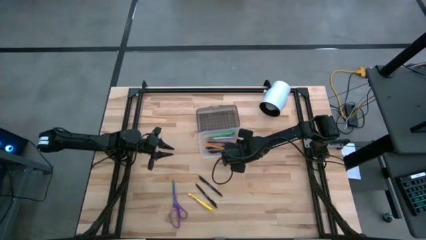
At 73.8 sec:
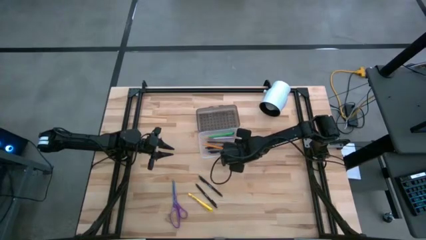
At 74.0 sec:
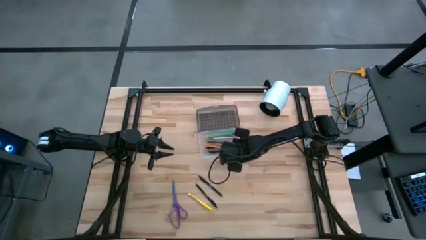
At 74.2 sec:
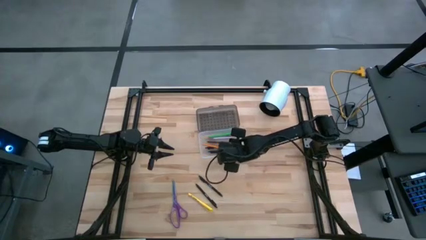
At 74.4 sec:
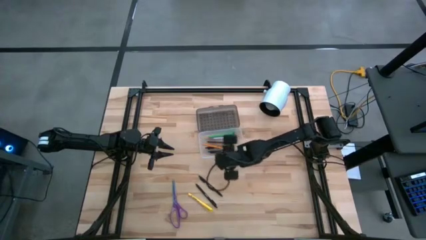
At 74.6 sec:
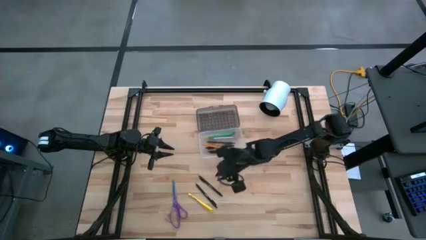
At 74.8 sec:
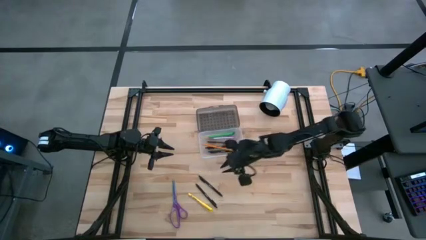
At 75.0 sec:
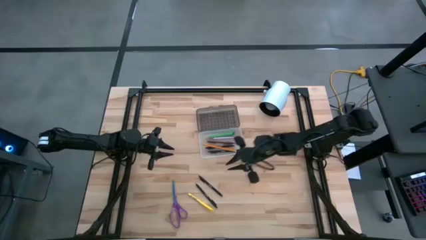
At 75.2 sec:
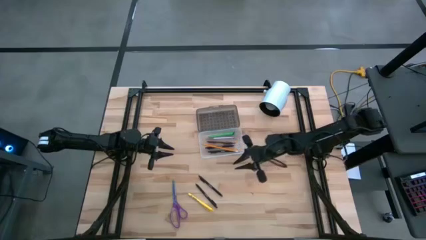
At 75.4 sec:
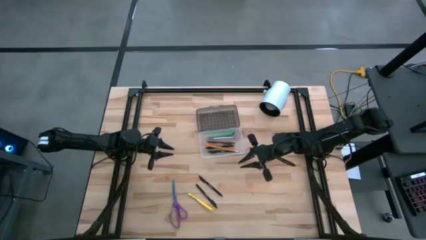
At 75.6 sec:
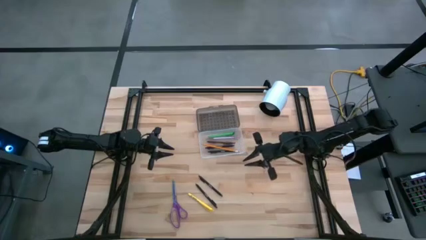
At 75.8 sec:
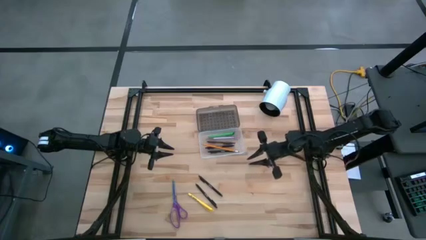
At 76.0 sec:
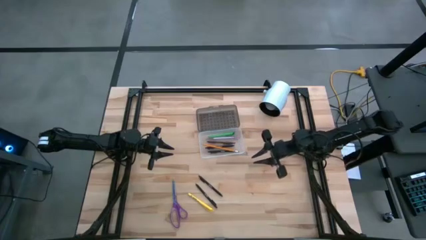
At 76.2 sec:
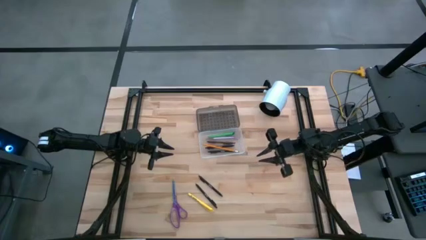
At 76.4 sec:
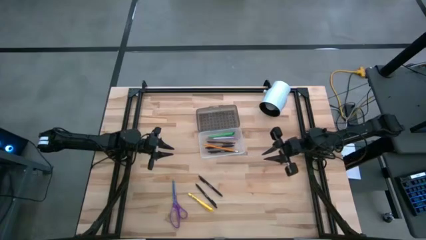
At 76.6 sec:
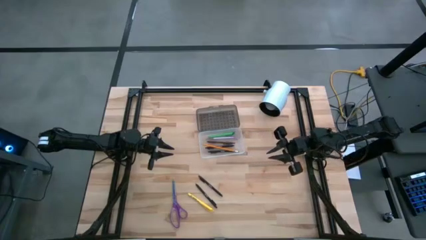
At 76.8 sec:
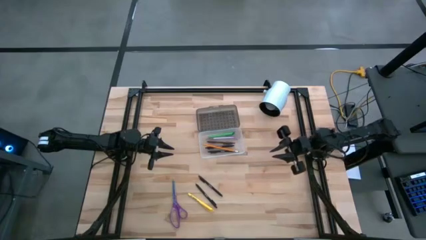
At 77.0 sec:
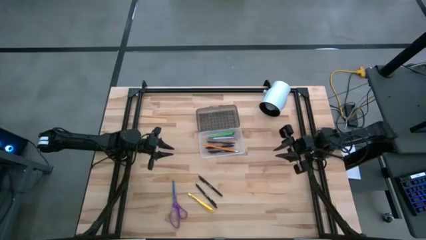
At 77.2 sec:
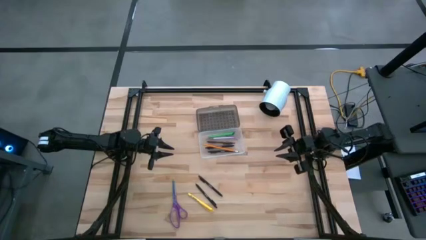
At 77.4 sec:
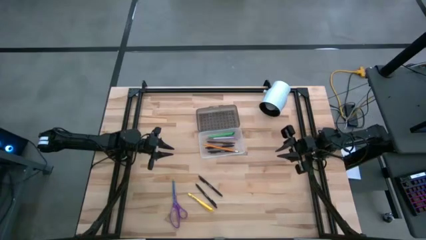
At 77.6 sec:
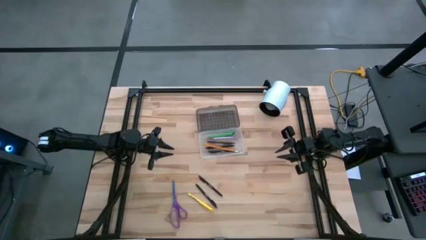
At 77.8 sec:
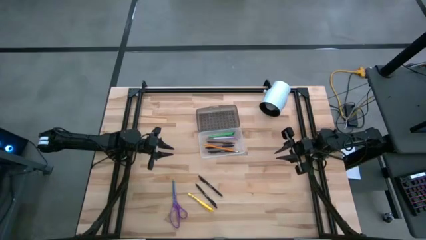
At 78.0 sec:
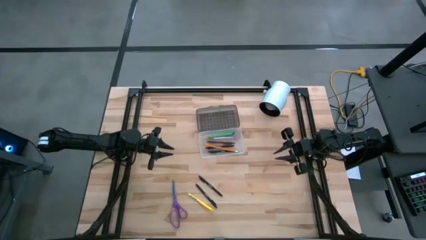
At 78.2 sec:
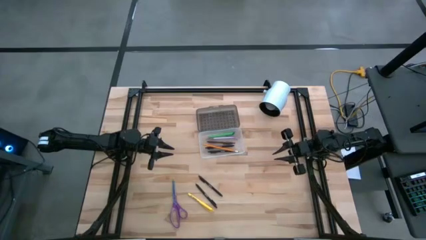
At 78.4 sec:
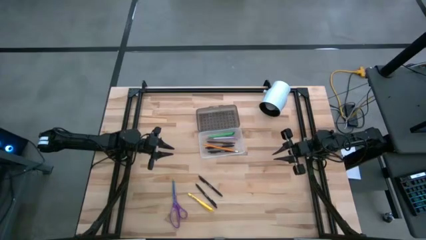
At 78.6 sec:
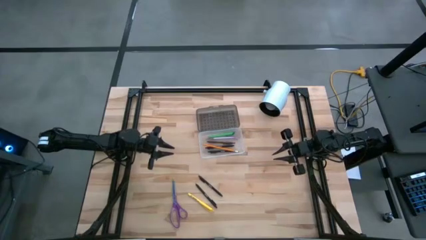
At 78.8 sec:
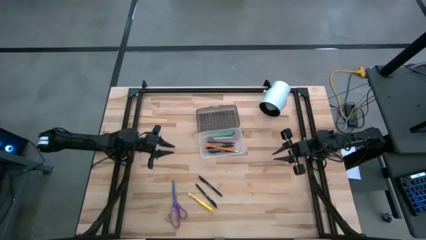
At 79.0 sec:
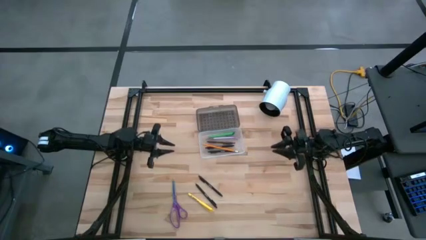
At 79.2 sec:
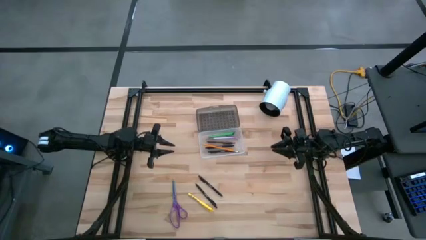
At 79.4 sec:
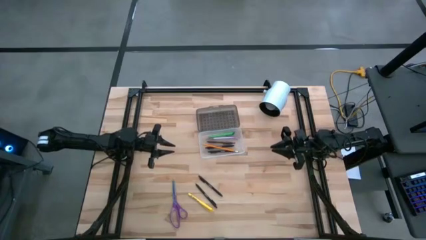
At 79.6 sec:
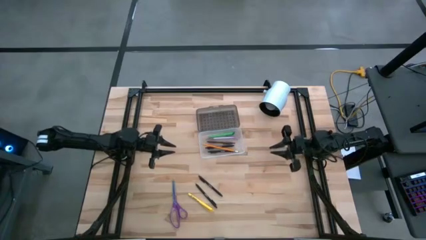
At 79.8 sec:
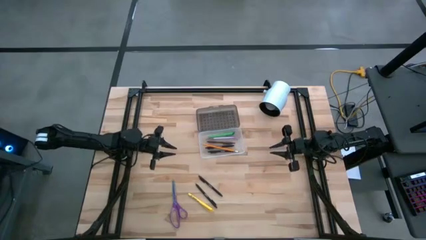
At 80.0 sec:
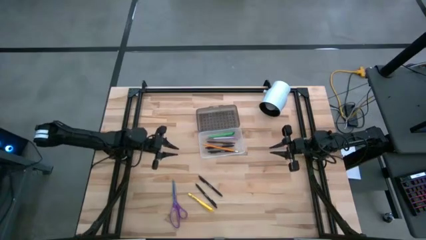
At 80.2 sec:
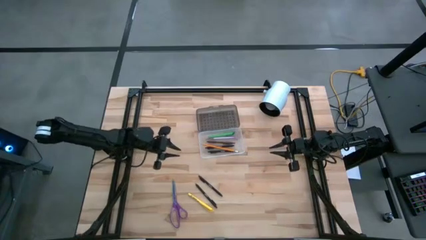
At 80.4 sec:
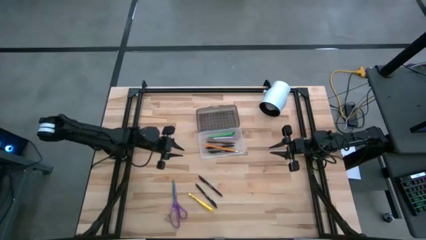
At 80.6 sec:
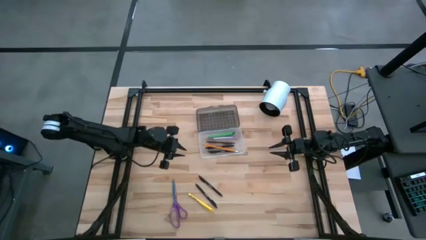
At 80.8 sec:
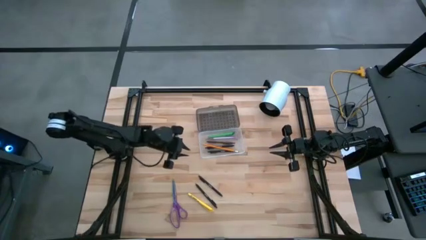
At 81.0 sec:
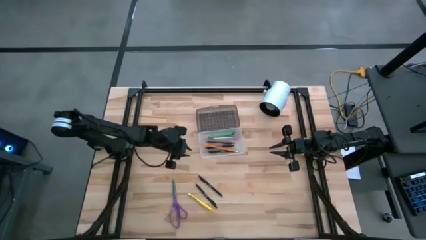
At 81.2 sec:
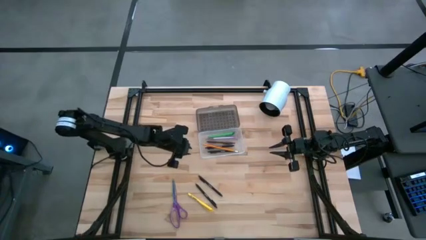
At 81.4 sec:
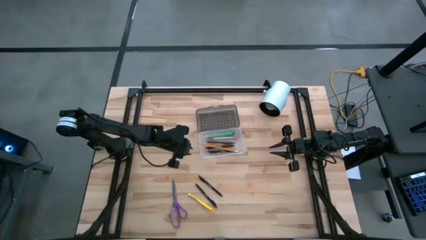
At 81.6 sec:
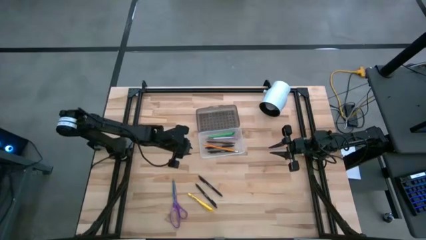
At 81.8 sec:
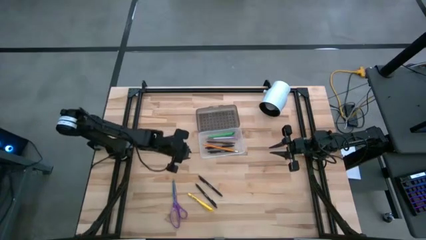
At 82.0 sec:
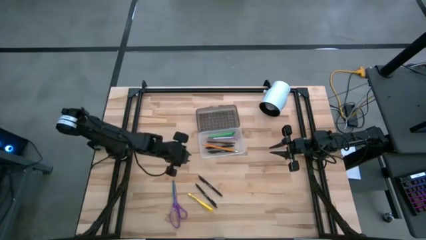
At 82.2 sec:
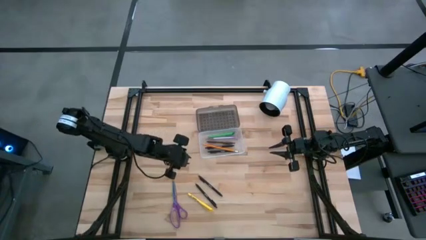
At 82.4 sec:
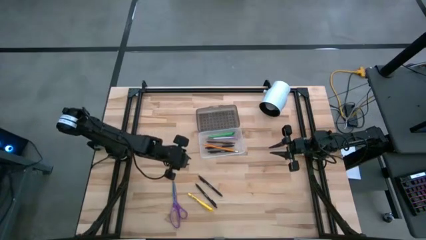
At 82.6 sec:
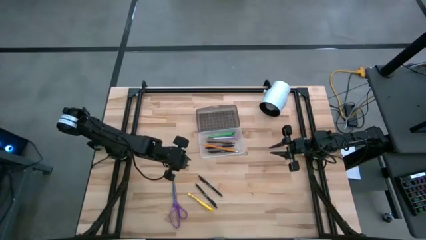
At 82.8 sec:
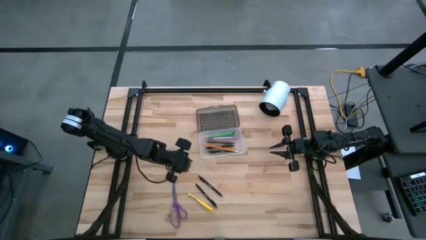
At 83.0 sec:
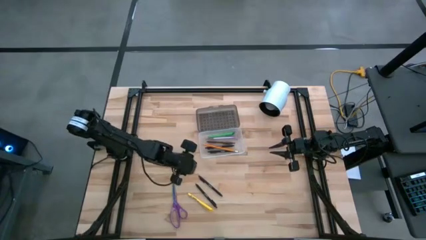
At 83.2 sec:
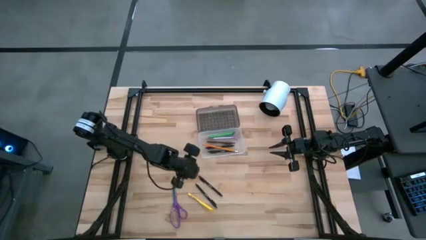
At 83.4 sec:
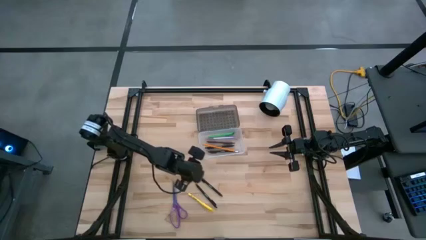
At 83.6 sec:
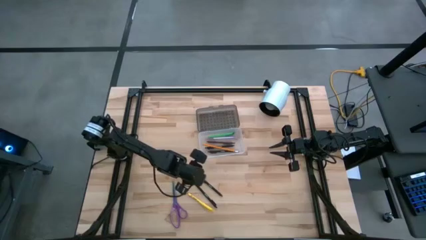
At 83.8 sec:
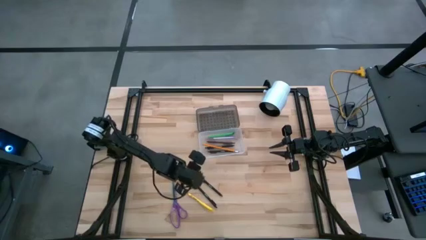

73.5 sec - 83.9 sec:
Task: Pick & place school supplies into a supply box
Put the black pen into the transparent supply box
